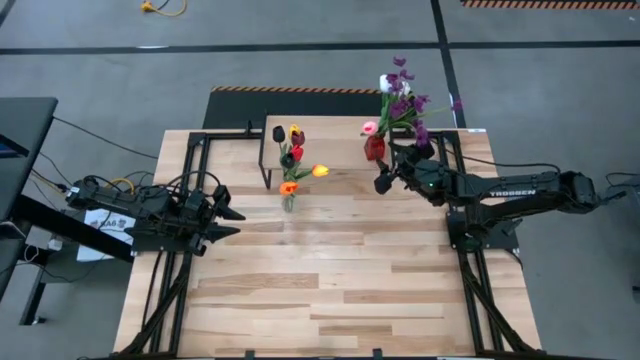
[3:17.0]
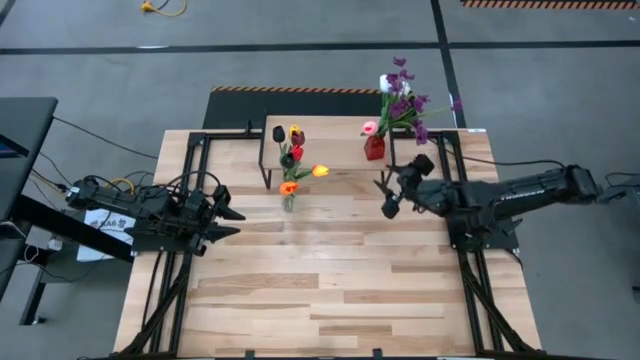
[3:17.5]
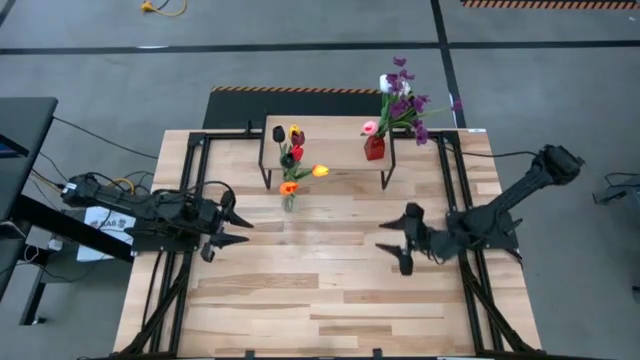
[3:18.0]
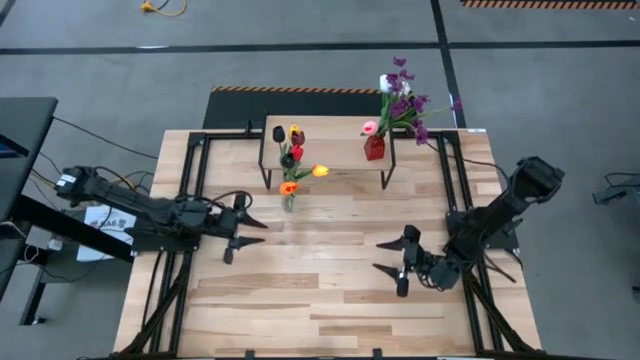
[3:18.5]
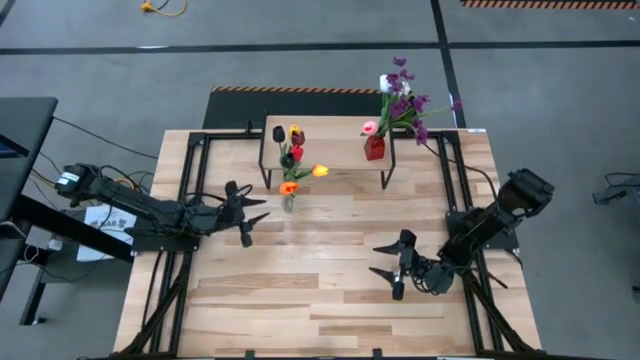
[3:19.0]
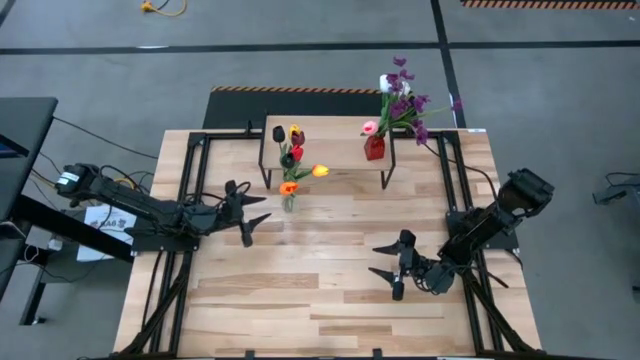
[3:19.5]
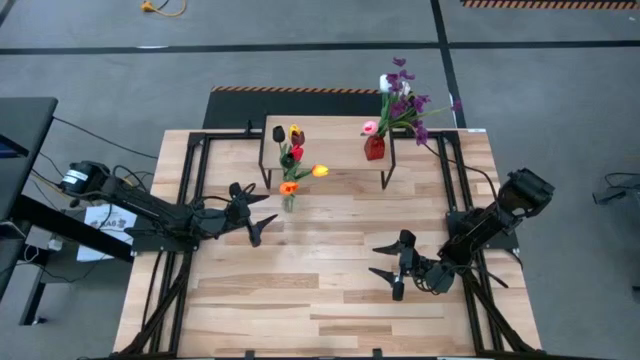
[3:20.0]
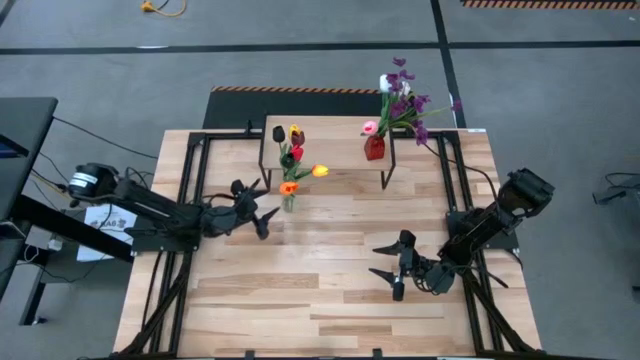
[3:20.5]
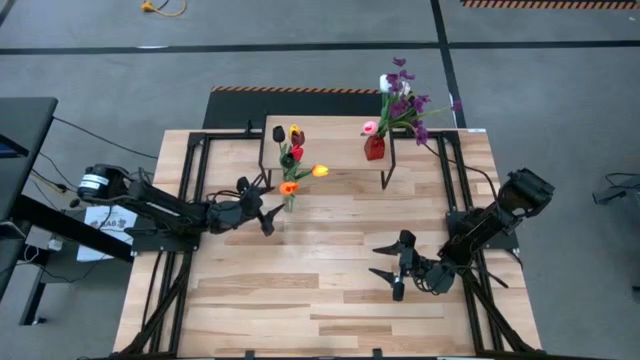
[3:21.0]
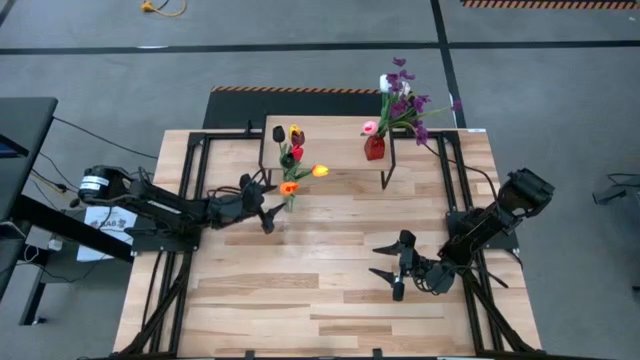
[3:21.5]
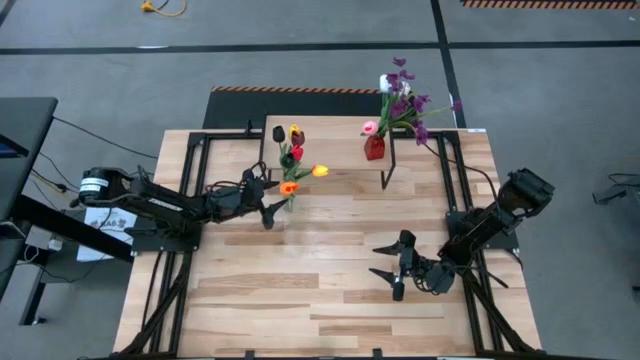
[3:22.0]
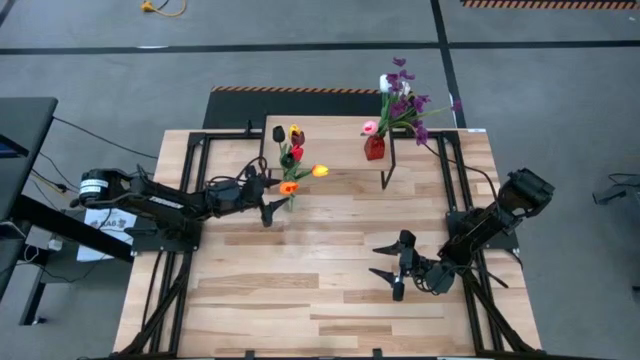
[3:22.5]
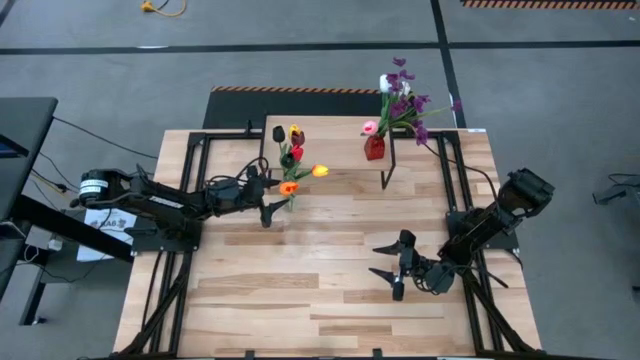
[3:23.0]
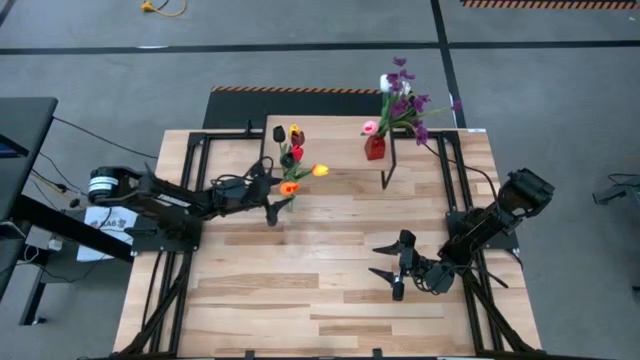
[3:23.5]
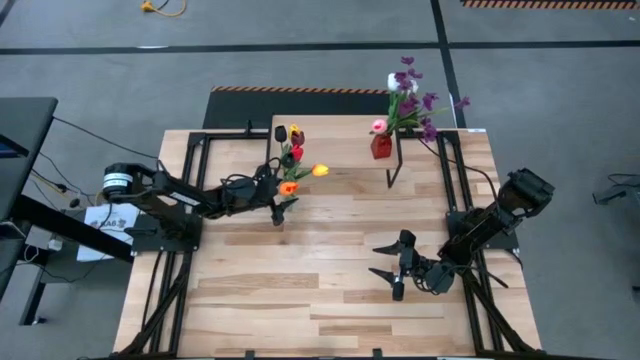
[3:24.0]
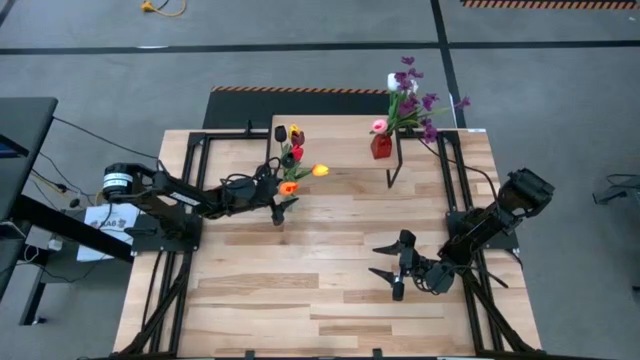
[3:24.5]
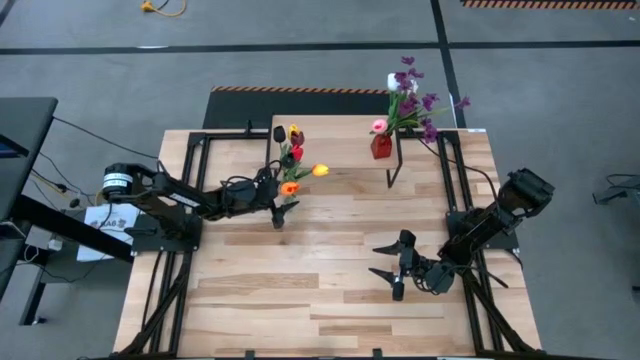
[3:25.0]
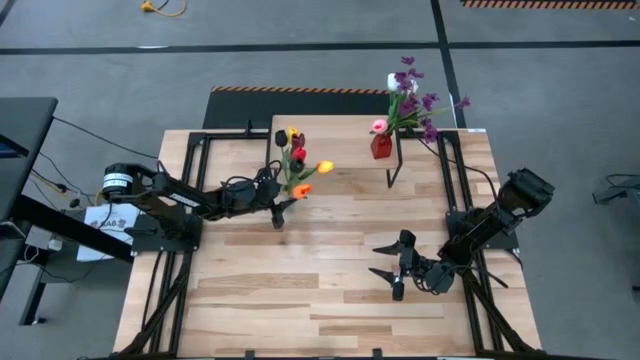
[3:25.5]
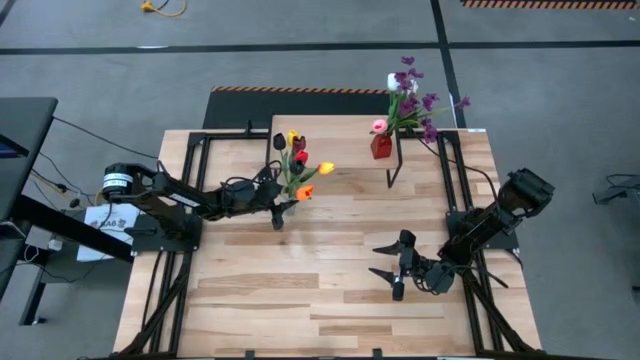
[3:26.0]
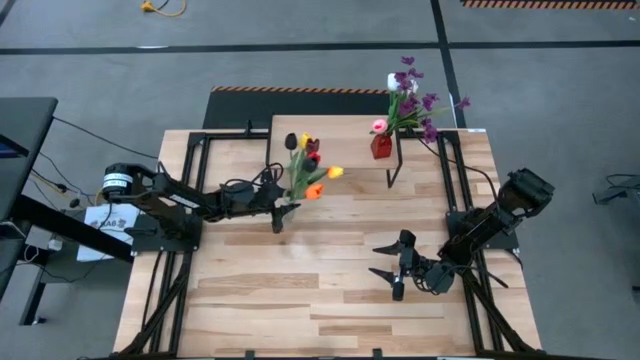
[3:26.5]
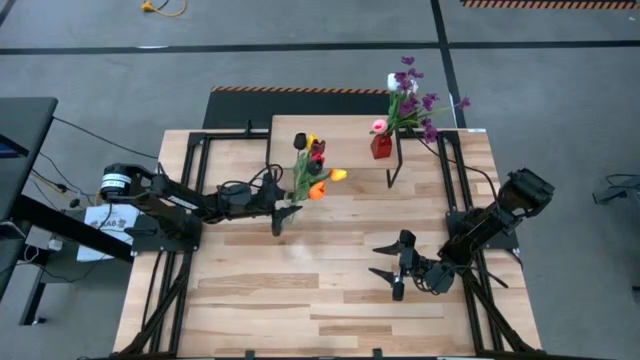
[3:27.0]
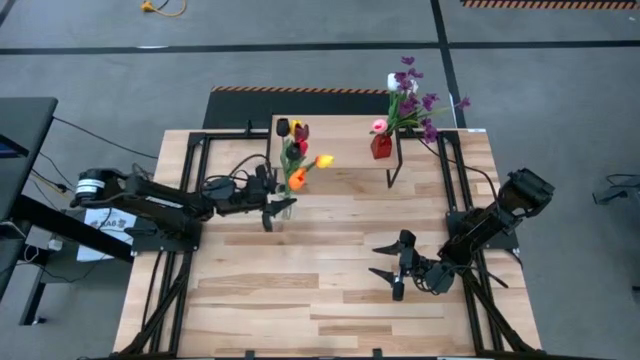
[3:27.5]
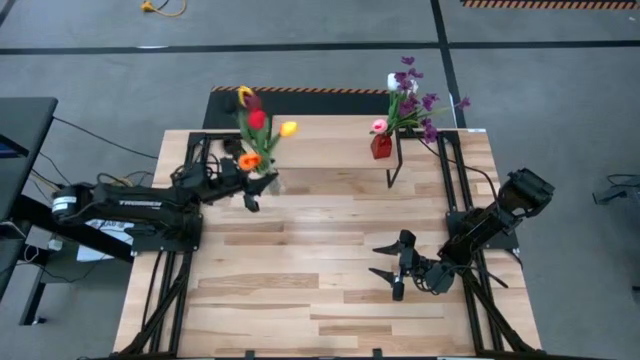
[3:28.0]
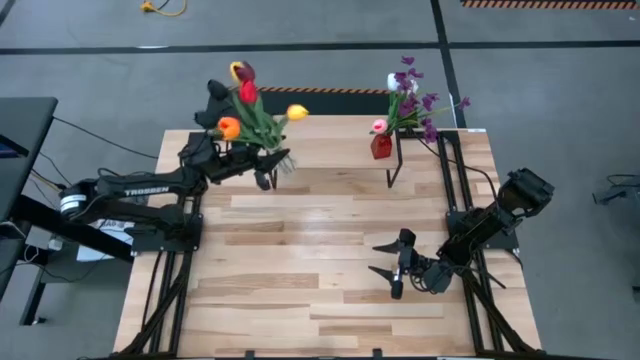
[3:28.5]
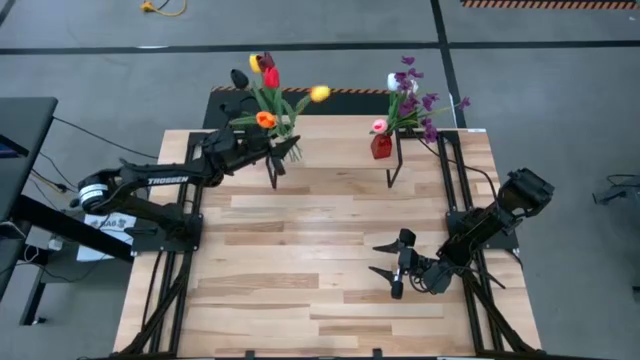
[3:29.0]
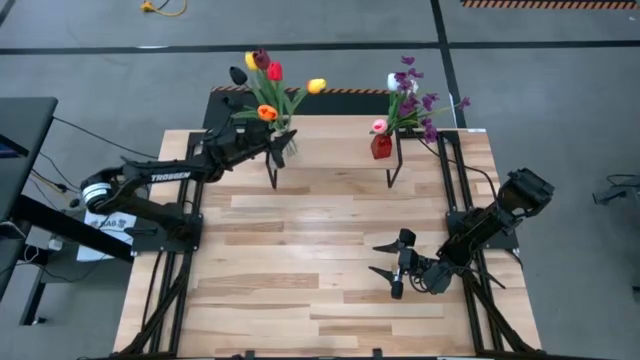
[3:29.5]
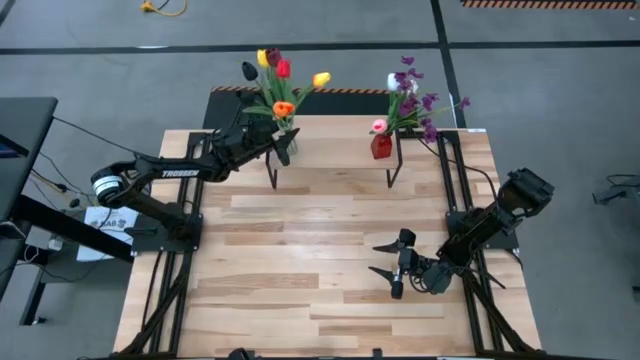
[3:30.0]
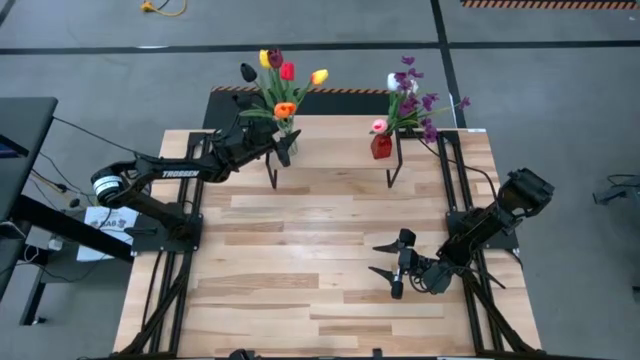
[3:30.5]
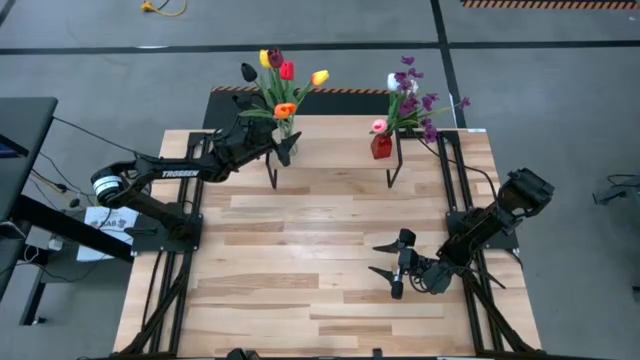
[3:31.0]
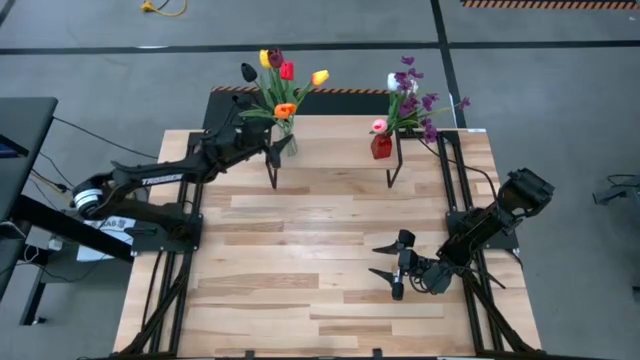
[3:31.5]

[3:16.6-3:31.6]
Task: Pick and place flowers into a vace then onto a shelf
Put the transparent vase with flowers on the shelf

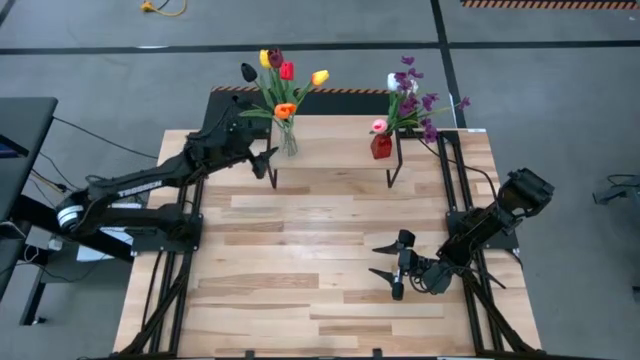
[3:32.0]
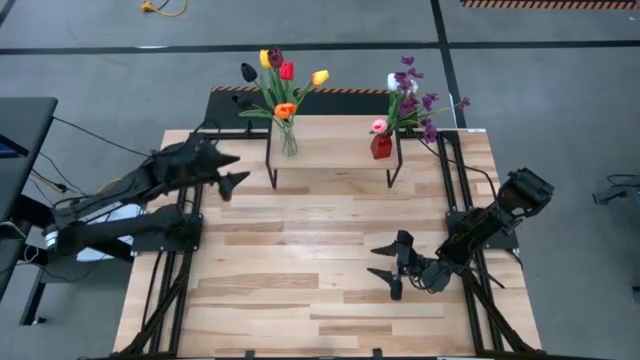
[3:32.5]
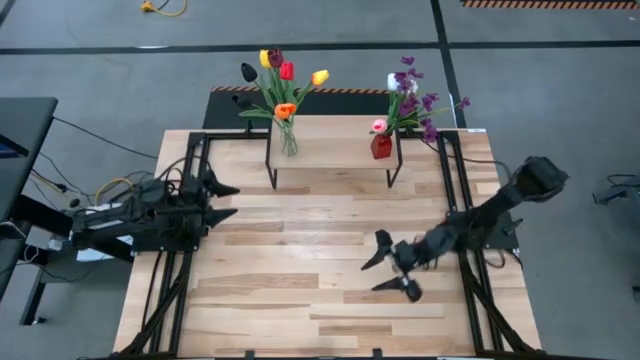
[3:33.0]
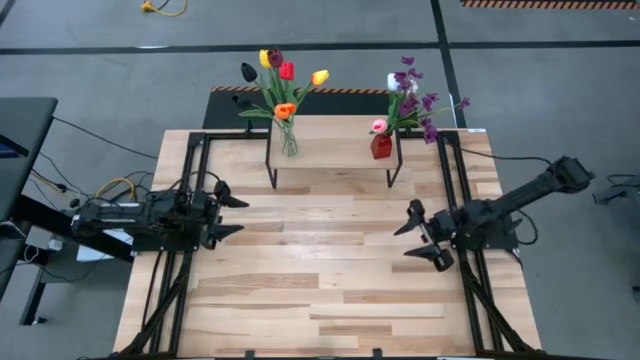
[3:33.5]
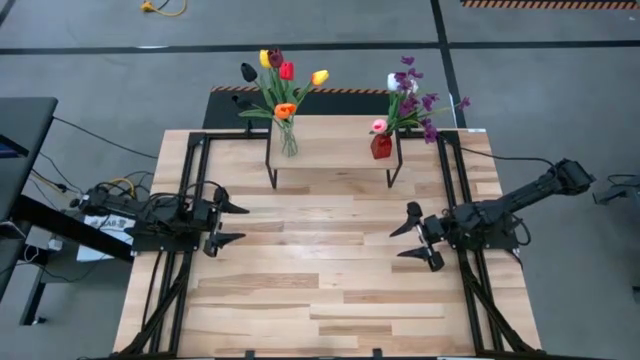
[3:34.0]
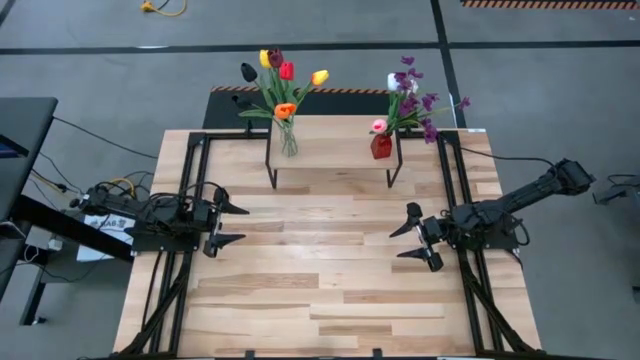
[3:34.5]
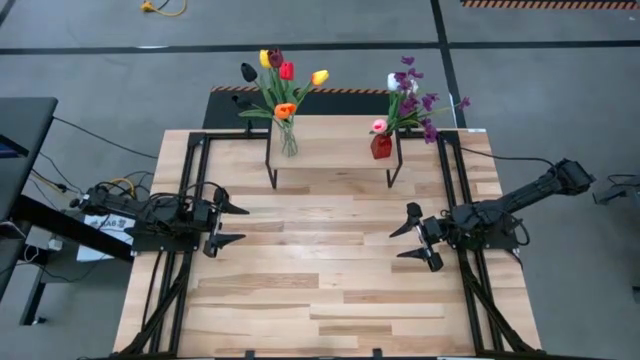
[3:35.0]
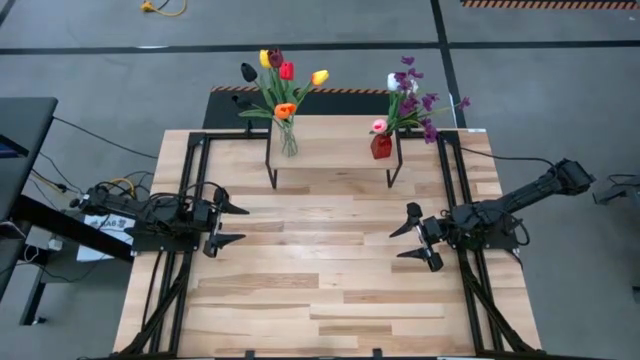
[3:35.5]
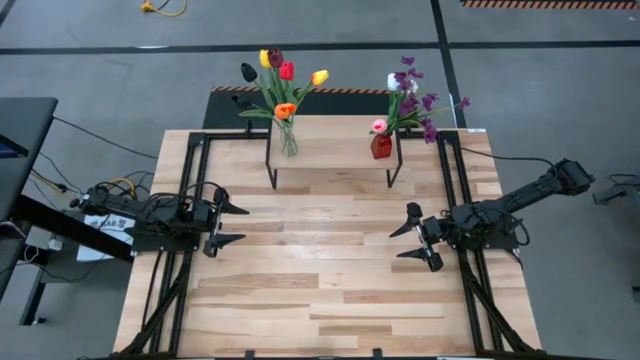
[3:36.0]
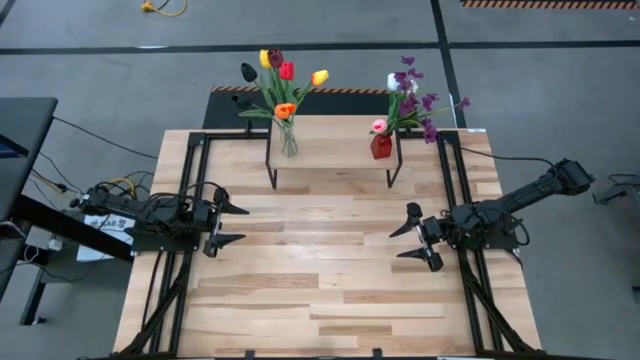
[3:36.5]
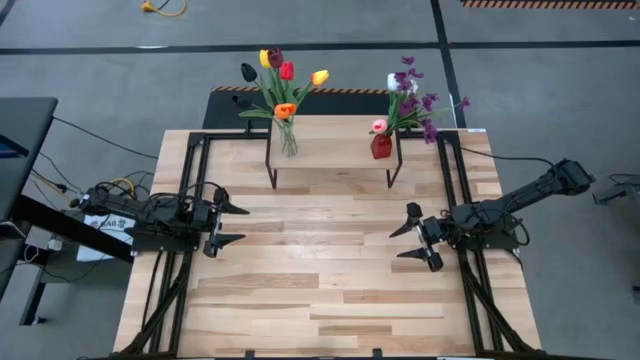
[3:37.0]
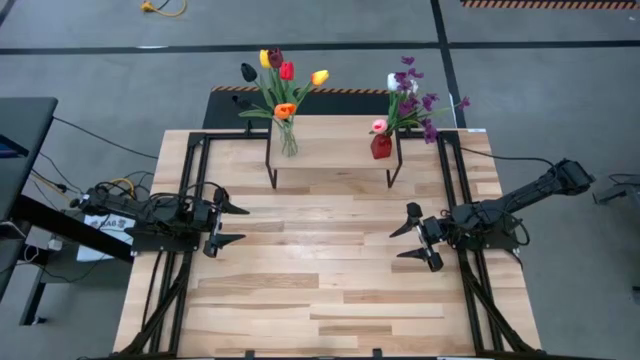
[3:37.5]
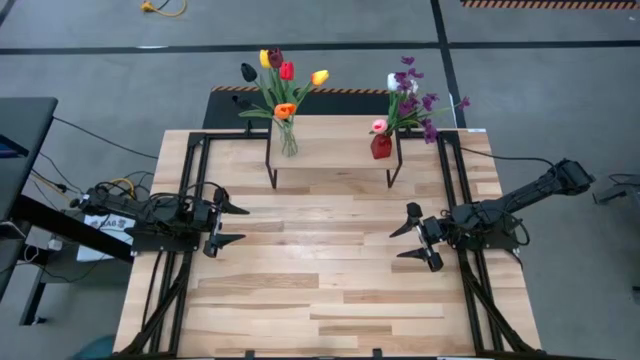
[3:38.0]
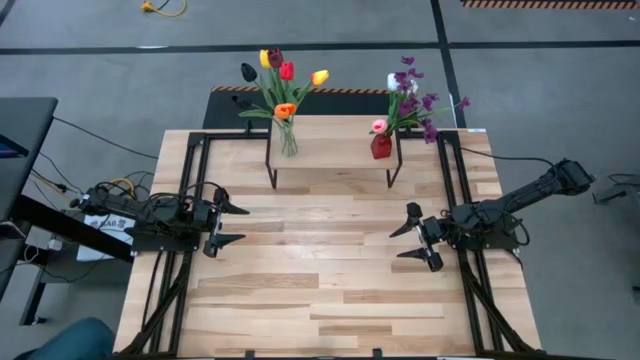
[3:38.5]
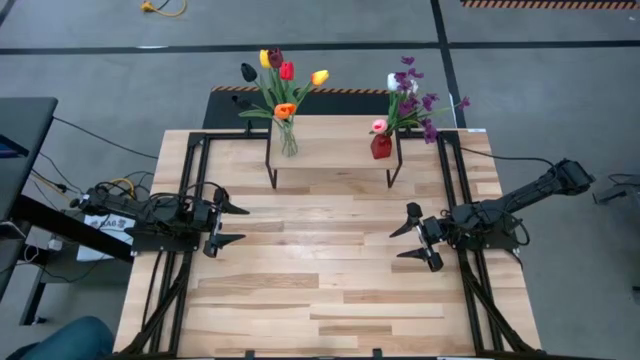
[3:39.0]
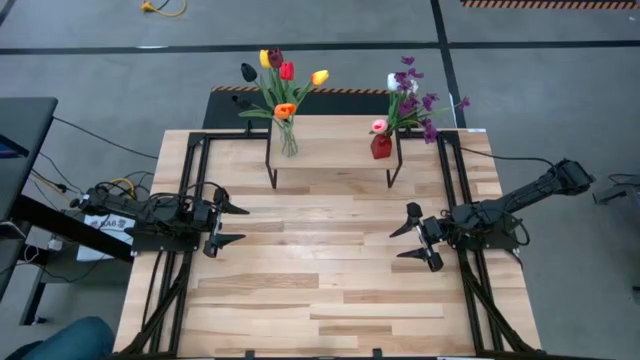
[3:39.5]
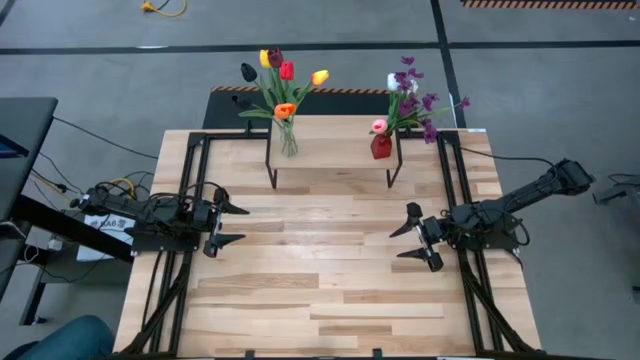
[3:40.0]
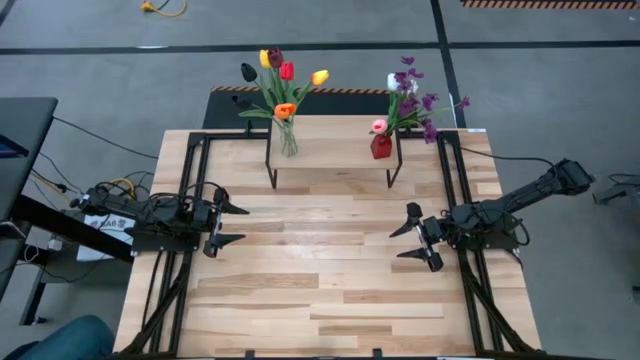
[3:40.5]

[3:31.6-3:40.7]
Return to Home Position
